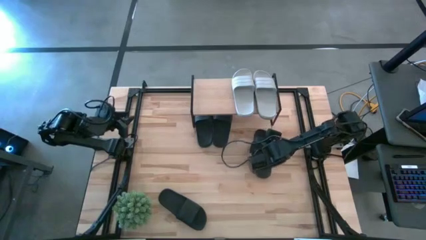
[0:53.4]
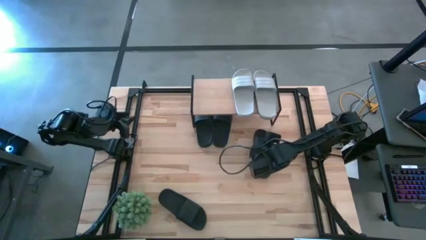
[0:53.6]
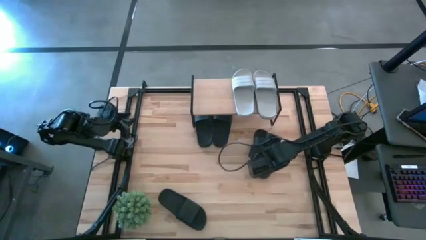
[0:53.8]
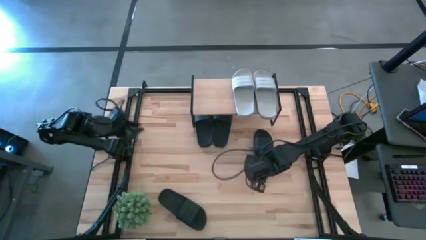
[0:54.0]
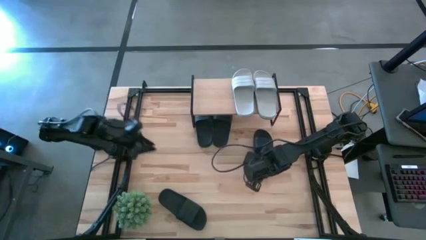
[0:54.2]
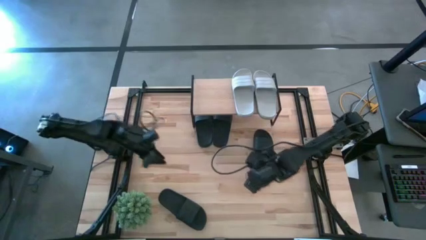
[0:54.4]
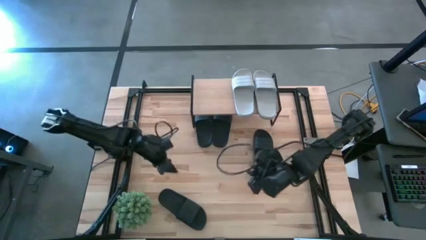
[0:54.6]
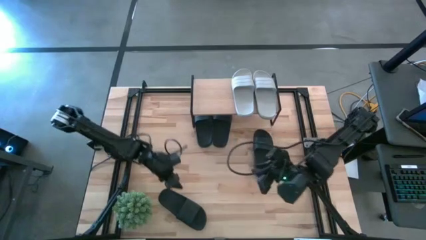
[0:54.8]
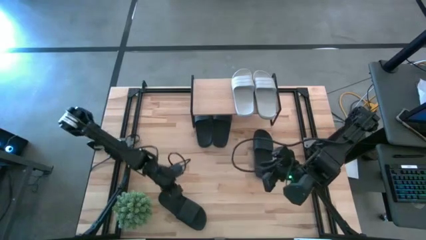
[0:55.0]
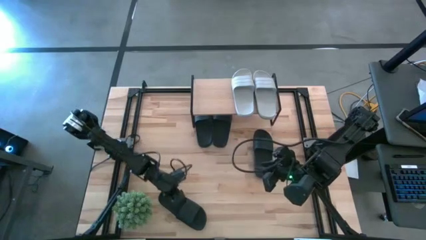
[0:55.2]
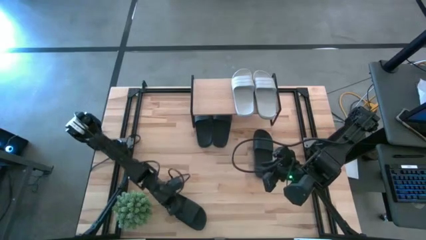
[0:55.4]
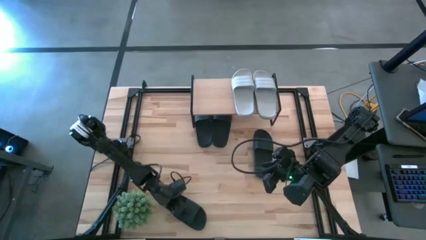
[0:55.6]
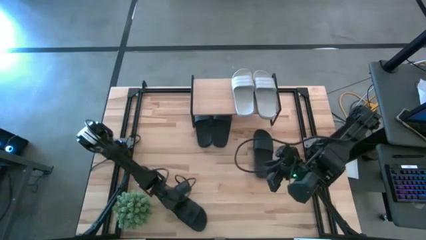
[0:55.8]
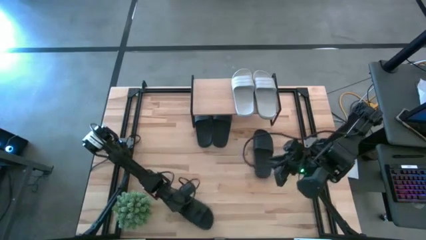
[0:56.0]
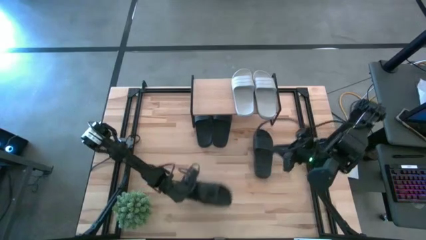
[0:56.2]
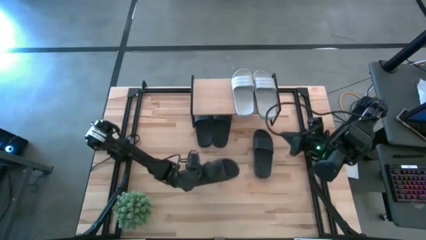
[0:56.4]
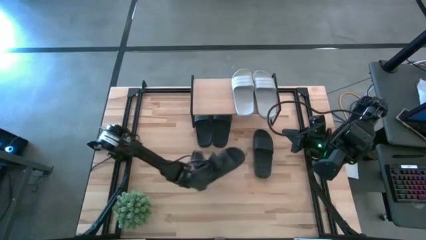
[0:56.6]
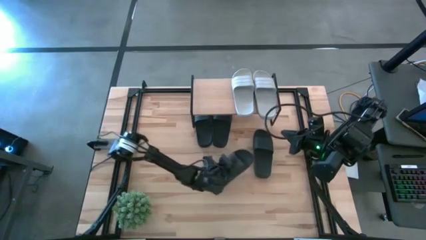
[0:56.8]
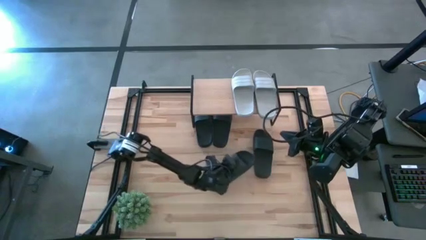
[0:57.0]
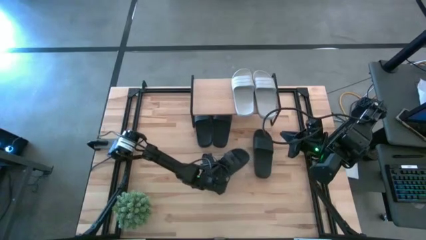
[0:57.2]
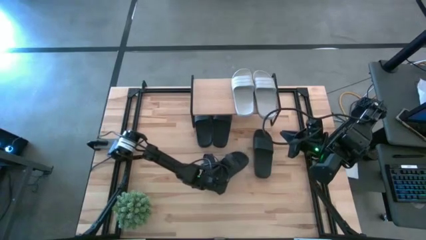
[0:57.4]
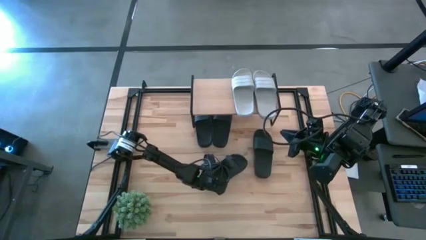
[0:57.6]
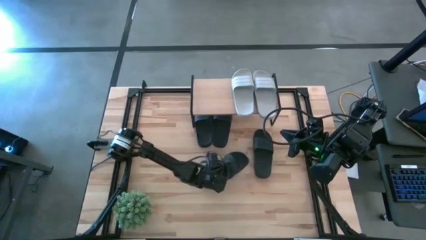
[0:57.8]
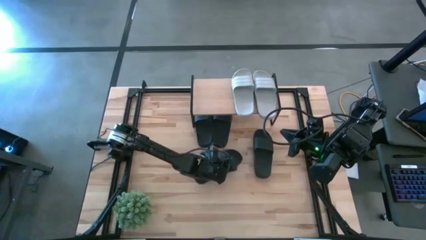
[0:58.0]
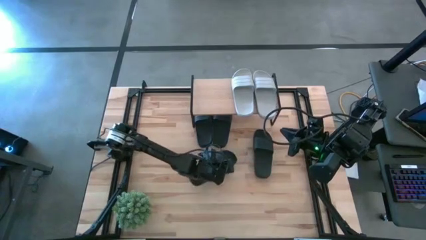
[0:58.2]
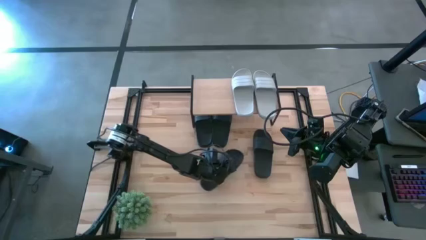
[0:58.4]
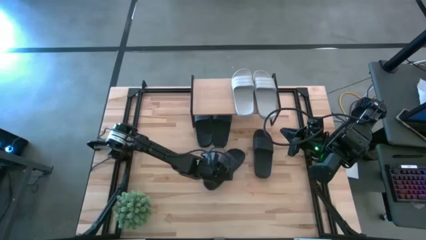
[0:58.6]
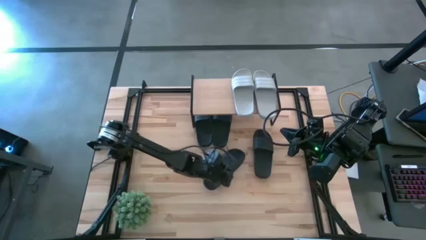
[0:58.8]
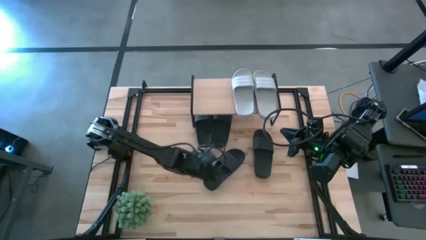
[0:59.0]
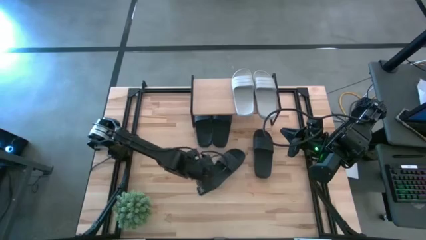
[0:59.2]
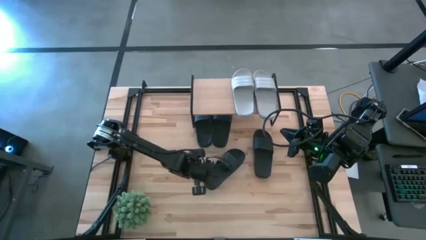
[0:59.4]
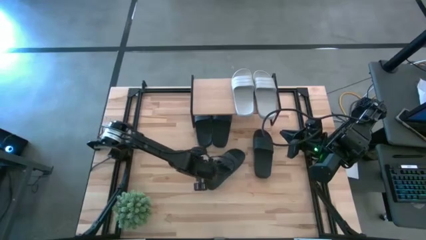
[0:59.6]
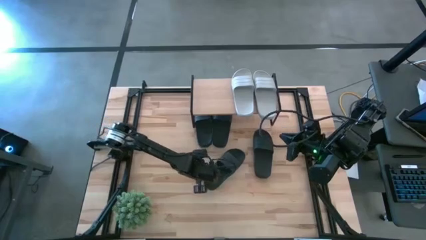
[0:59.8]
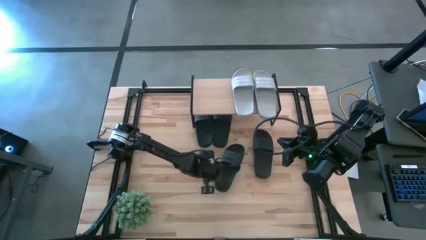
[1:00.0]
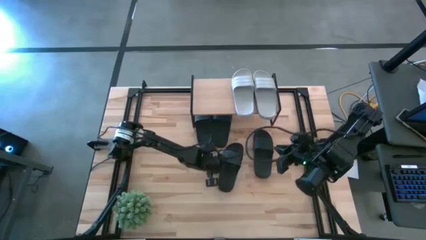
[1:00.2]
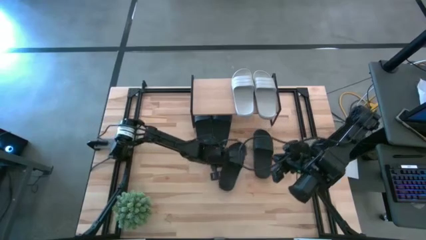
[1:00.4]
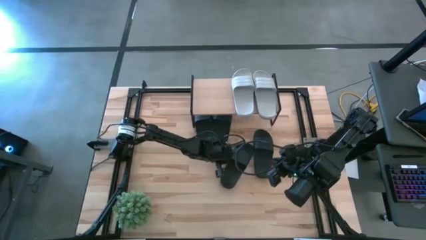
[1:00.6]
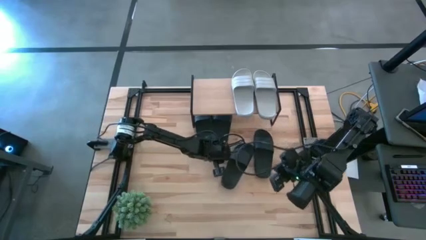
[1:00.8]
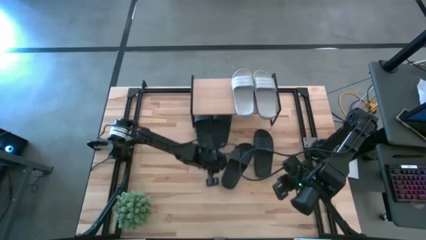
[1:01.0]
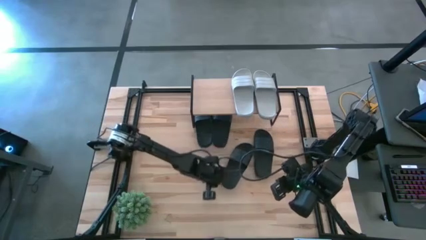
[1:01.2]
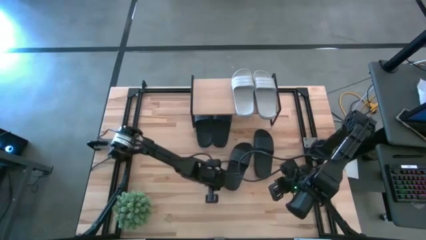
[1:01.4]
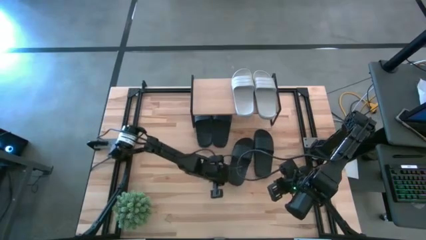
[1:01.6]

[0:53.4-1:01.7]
Task: Pick and place slides into the shelf
Put the black slide near the shelf

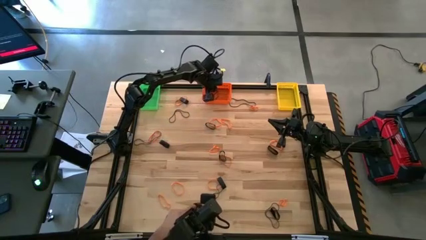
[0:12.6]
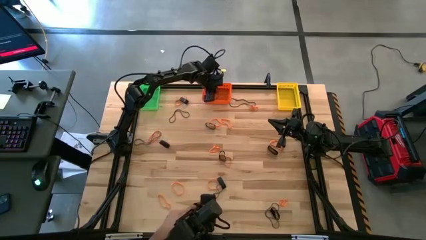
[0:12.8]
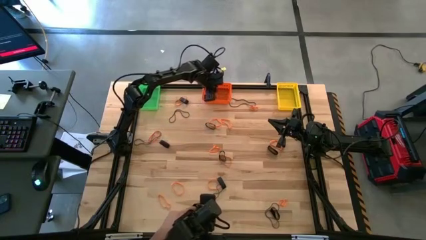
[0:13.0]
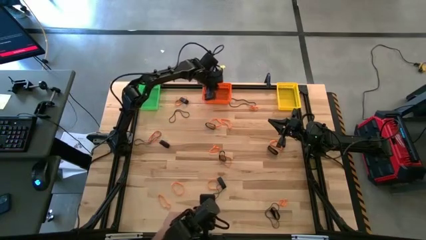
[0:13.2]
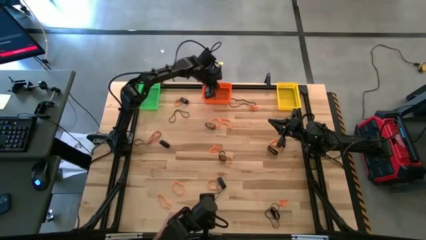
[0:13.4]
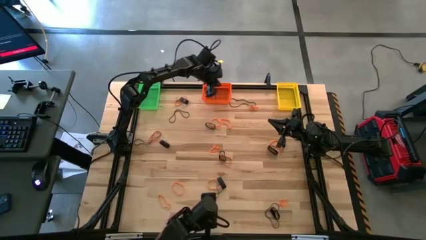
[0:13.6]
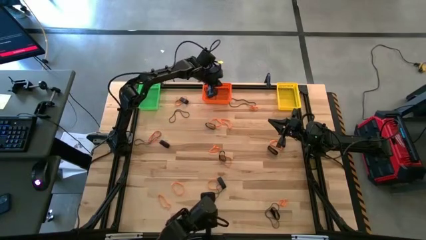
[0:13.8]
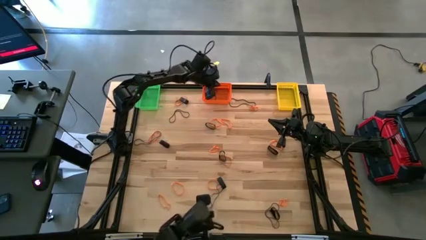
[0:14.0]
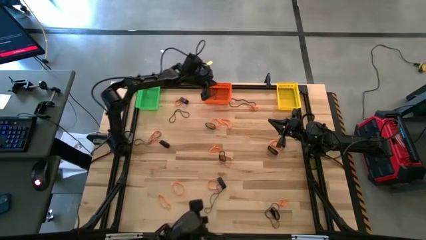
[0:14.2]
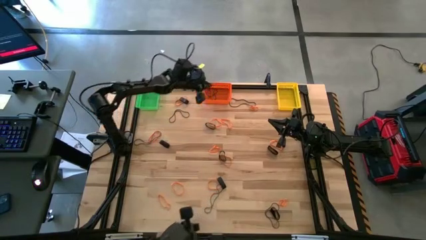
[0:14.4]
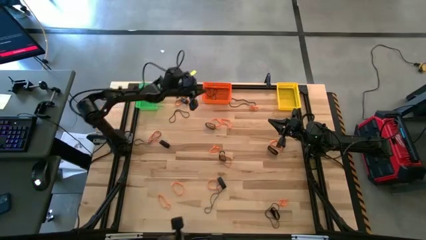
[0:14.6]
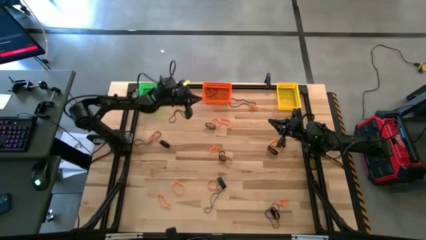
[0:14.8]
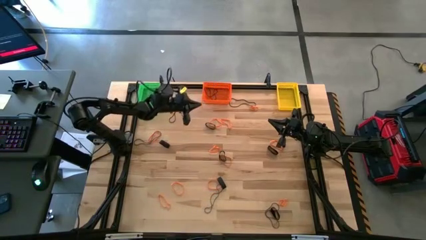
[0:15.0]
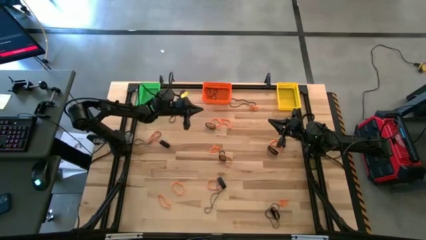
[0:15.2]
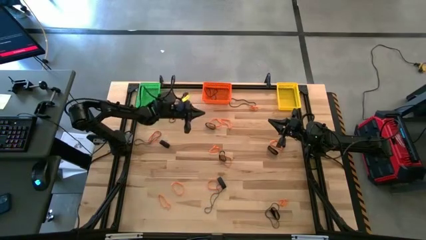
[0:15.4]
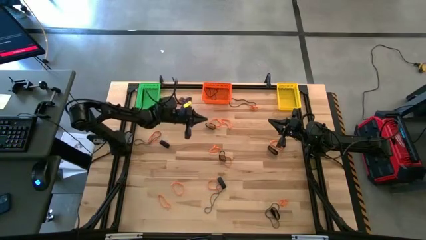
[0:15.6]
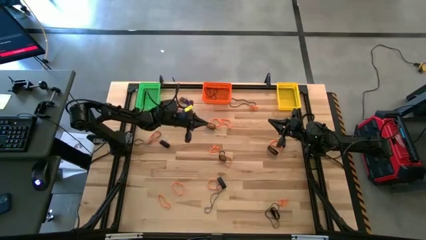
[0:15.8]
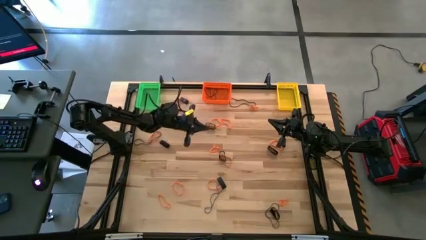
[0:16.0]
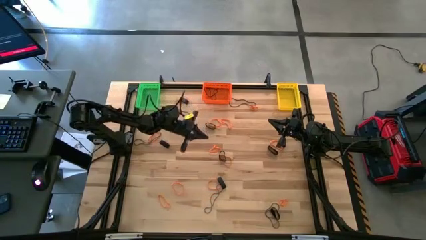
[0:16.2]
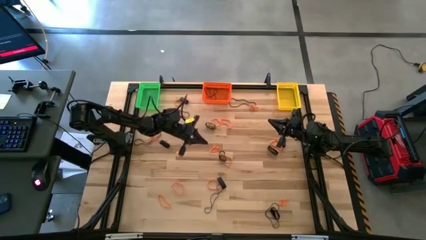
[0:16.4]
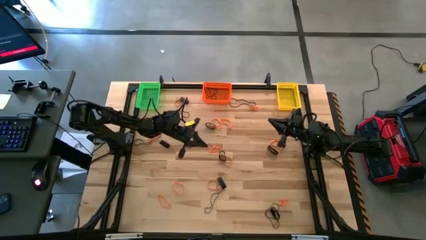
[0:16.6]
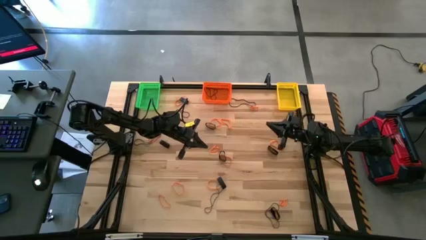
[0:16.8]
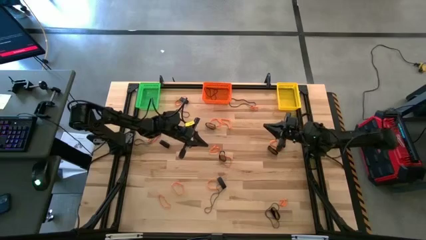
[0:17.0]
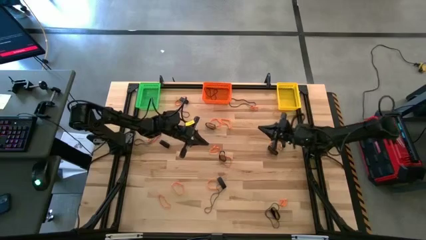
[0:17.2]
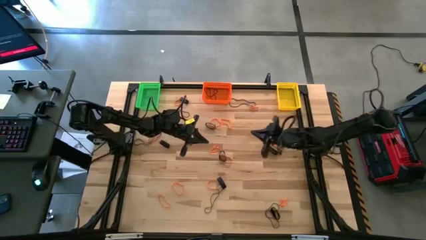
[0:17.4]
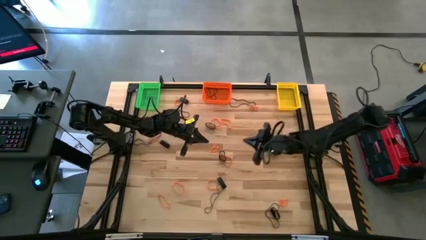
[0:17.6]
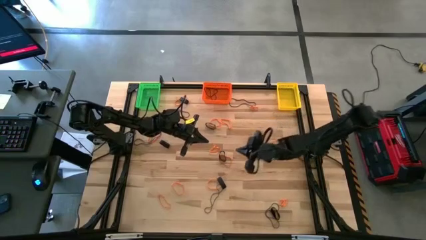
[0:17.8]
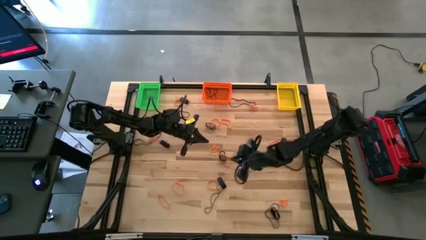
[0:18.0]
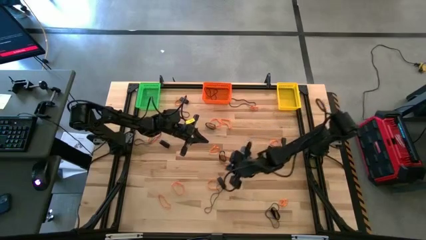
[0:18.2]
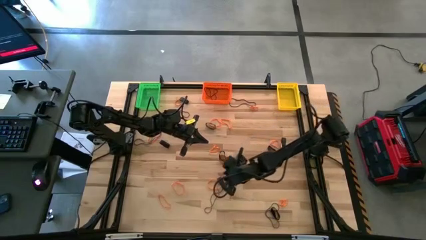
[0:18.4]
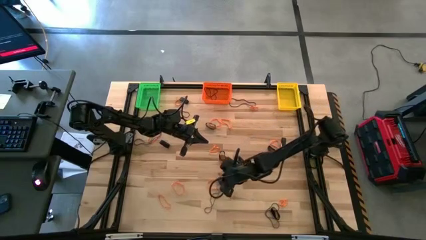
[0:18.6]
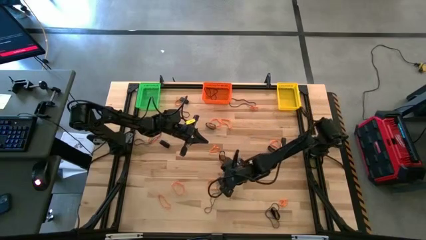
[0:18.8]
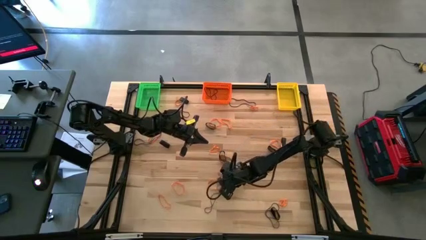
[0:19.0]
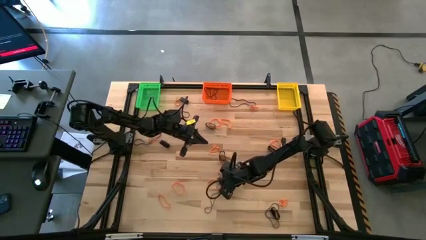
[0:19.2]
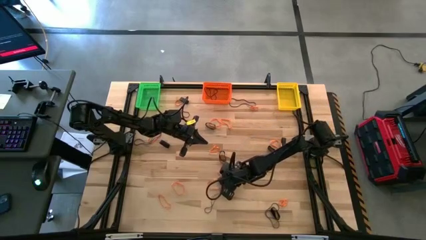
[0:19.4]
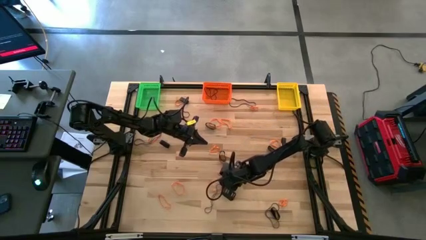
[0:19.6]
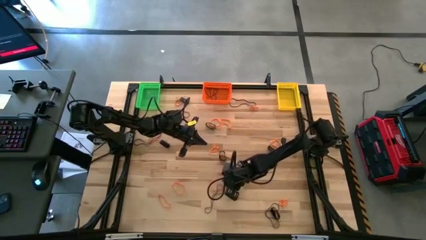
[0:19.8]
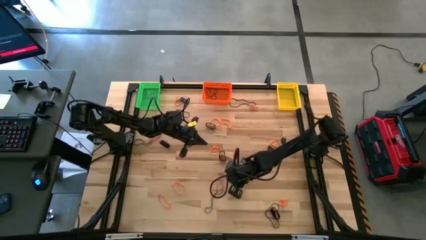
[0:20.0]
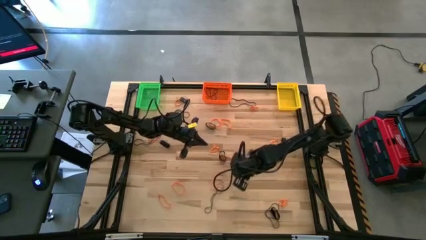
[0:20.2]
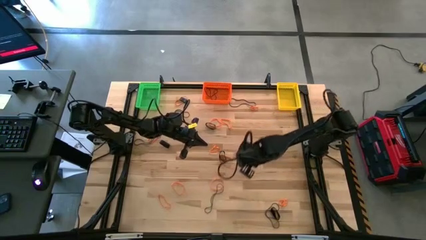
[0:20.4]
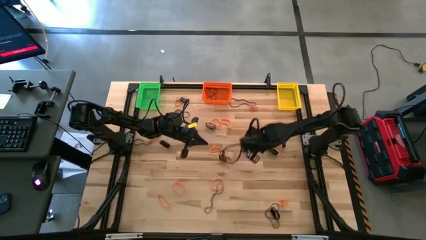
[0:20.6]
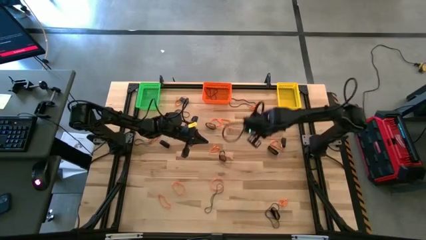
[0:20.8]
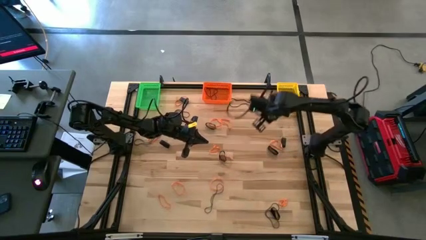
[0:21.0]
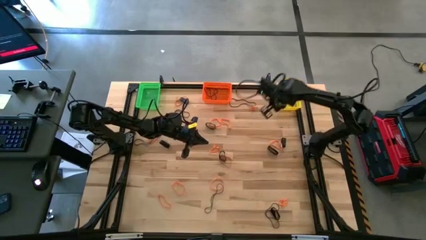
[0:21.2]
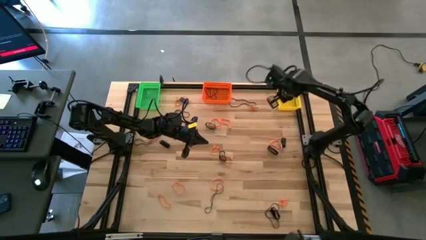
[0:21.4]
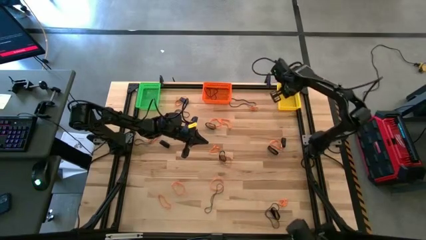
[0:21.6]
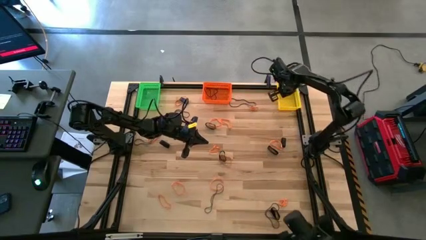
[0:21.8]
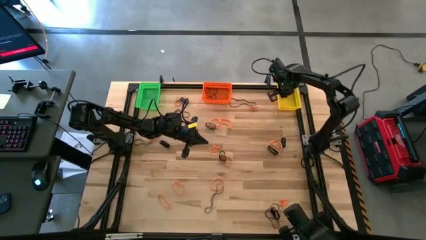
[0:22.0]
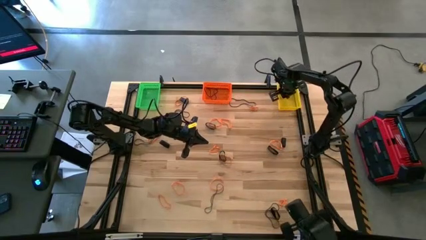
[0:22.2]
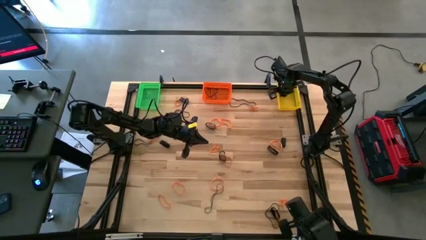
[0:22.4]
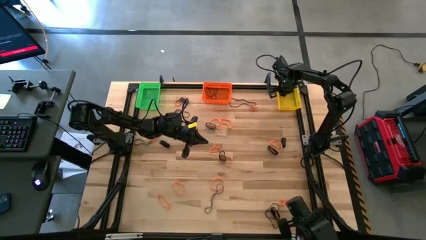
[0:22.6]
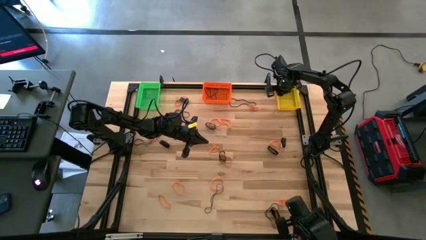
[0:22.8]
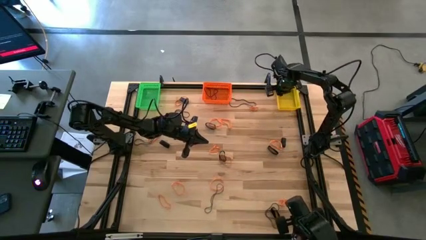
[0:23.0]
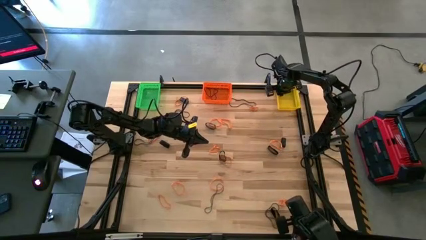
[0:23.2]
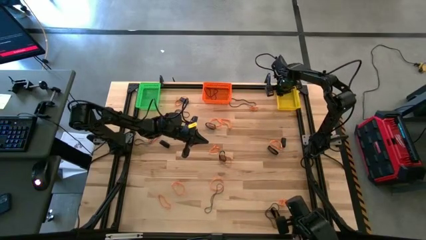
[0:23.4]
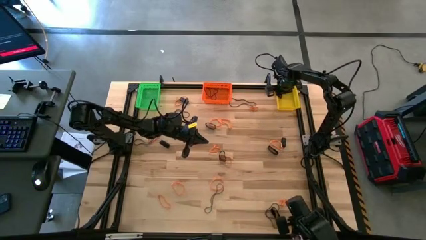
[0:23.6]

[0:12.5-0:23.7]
Task: Sort rubber bands into baskets
Put the bottom center black rubber band into the yellow bin
